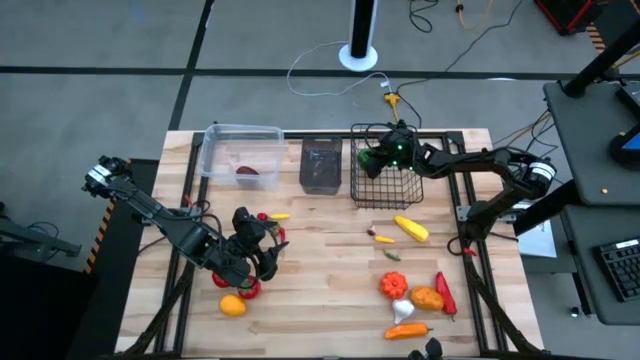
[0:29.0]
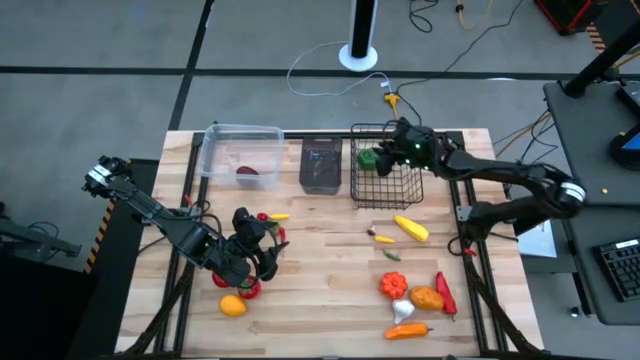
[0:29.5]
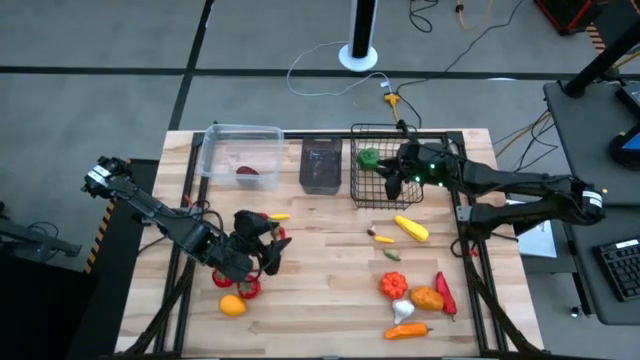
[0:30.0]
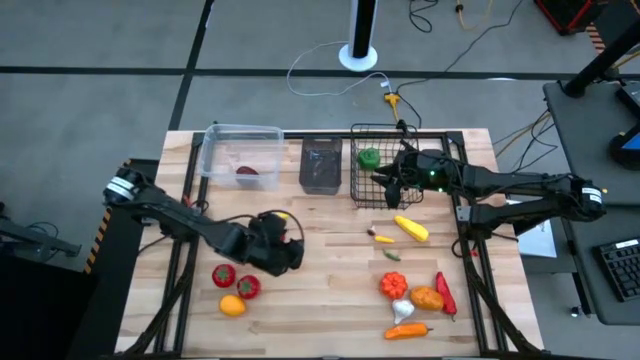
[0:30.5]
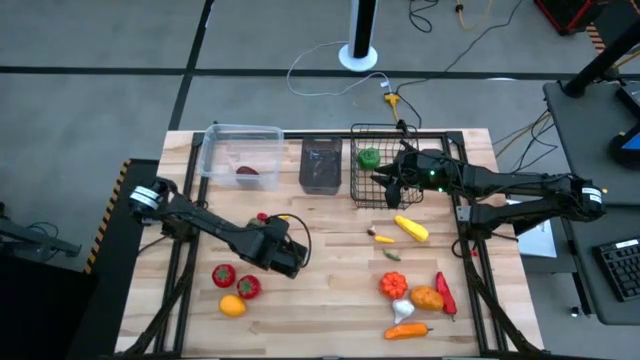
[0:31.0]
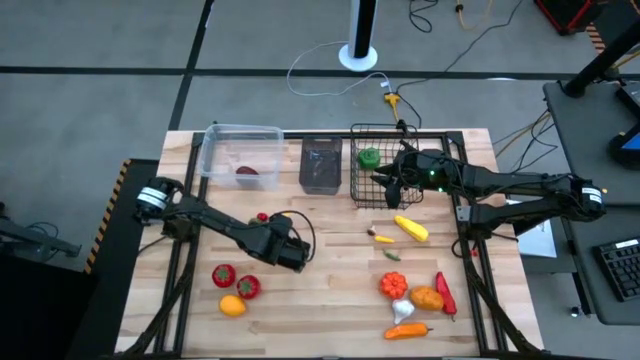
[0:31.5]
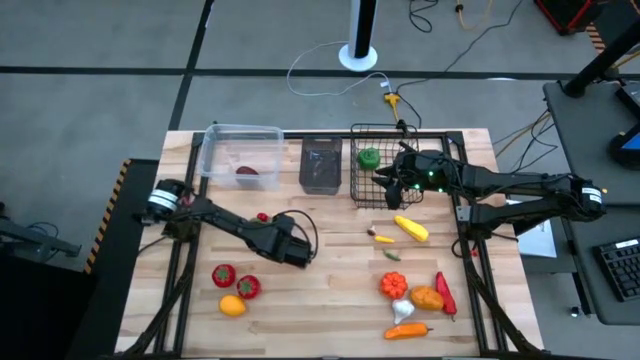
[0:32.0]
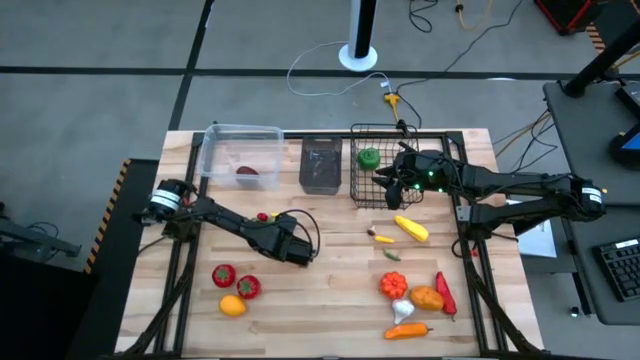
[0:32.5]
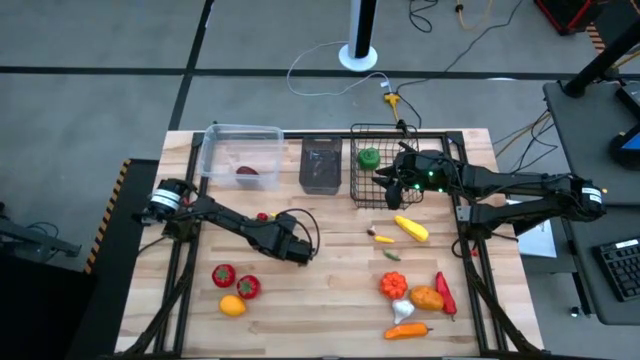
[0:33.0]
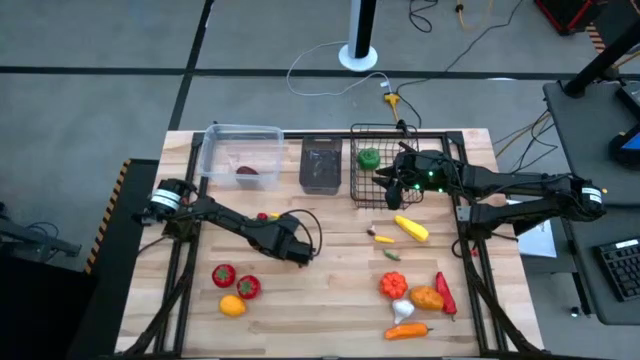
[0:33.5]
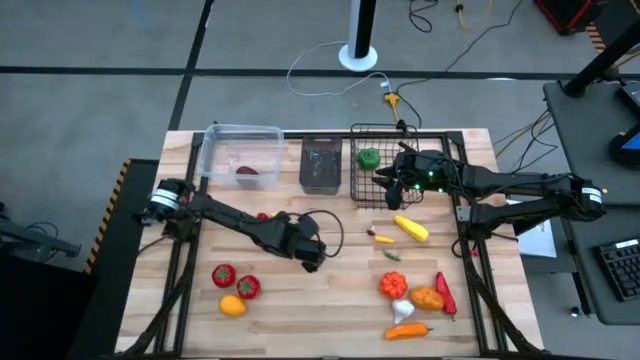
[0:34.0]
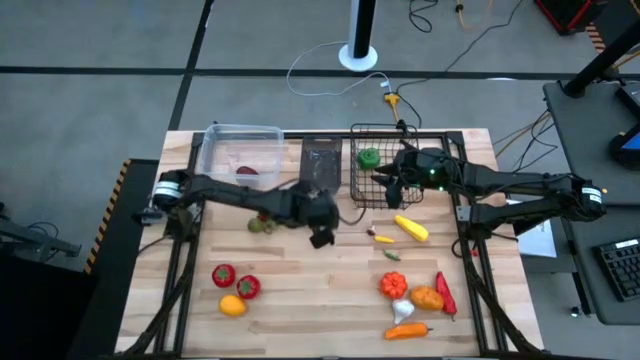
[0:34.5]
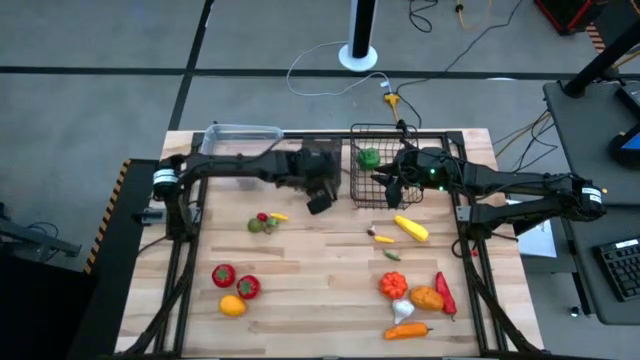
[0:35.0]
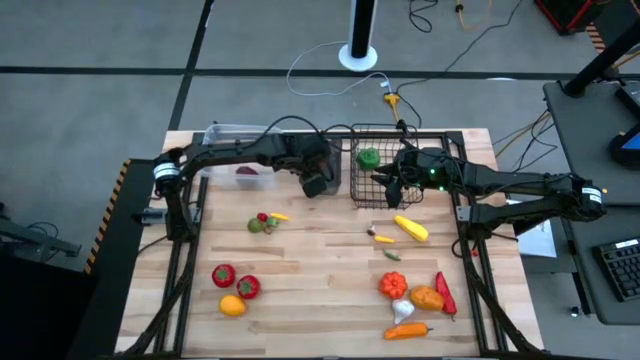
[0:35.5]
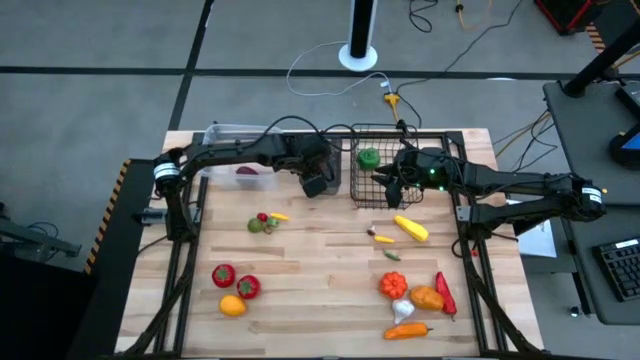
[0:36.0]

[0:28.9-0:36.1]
Task: Sort produce into baskets
Put the red chili pepper into the black bin

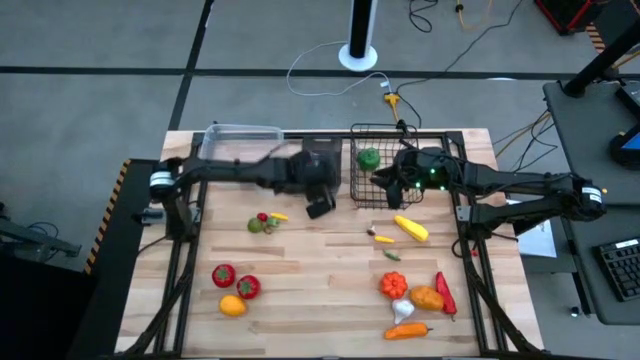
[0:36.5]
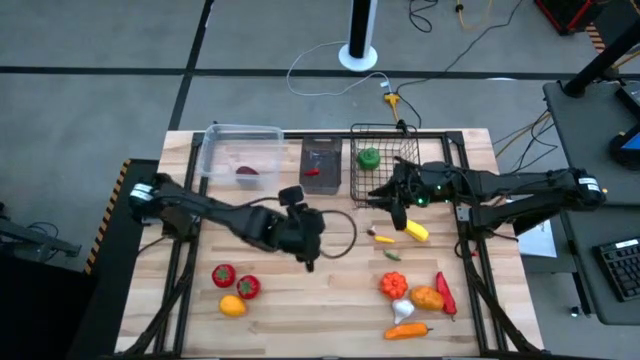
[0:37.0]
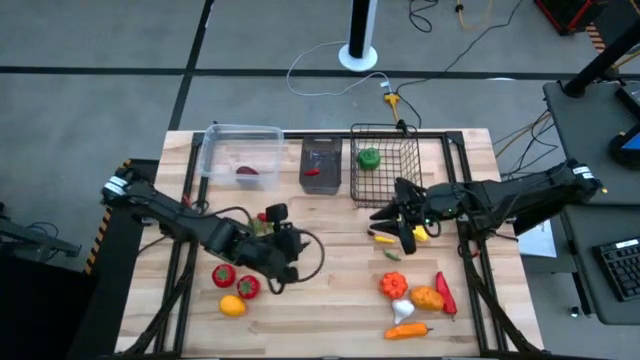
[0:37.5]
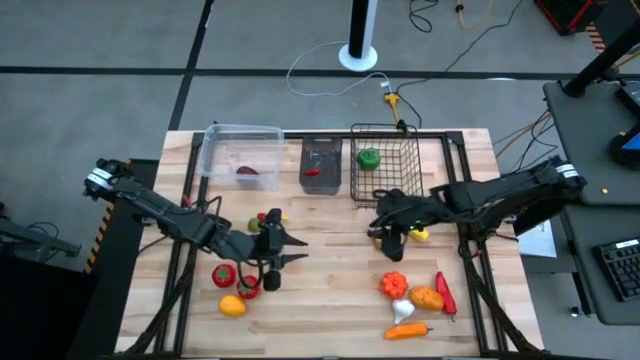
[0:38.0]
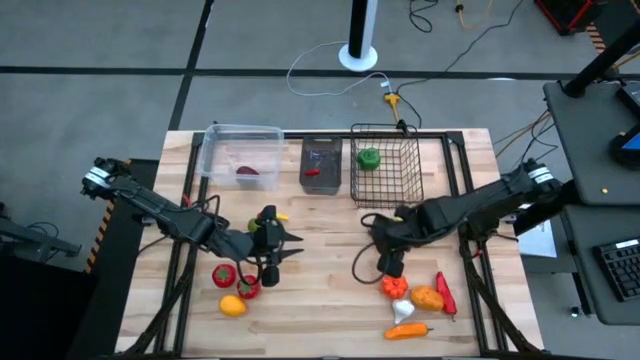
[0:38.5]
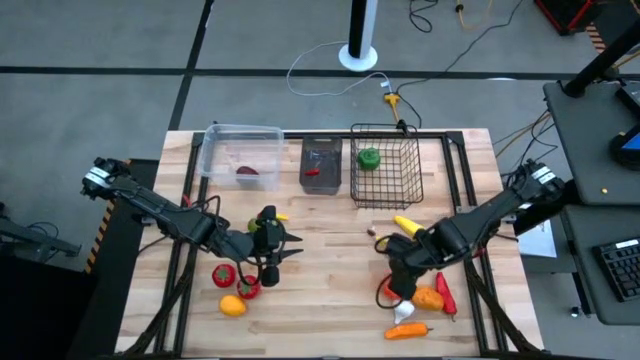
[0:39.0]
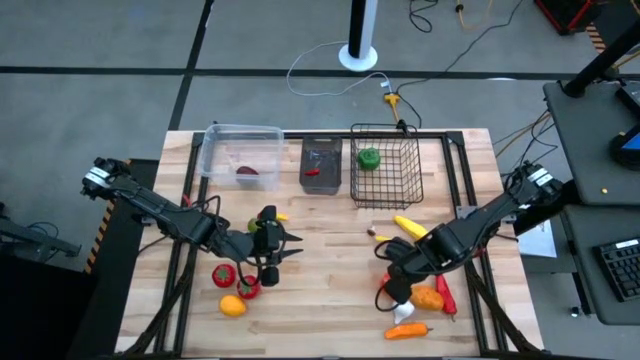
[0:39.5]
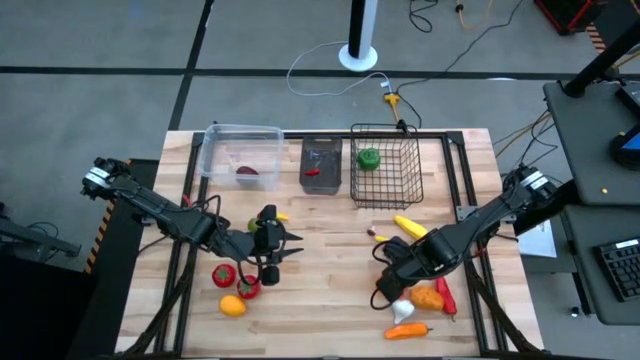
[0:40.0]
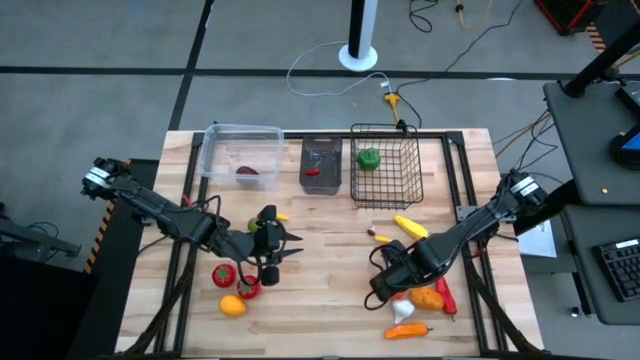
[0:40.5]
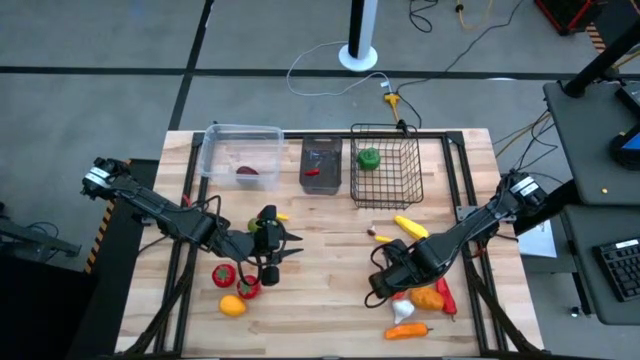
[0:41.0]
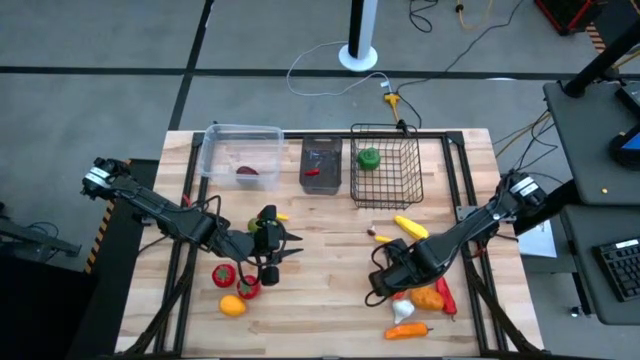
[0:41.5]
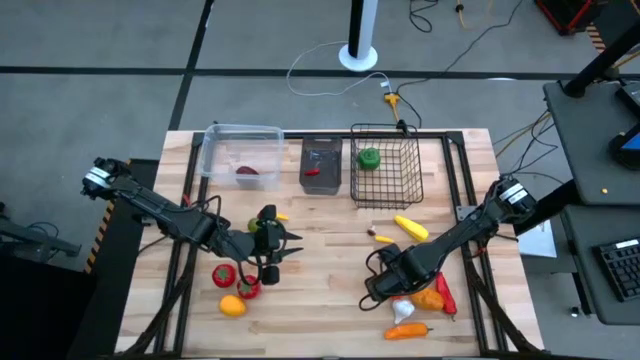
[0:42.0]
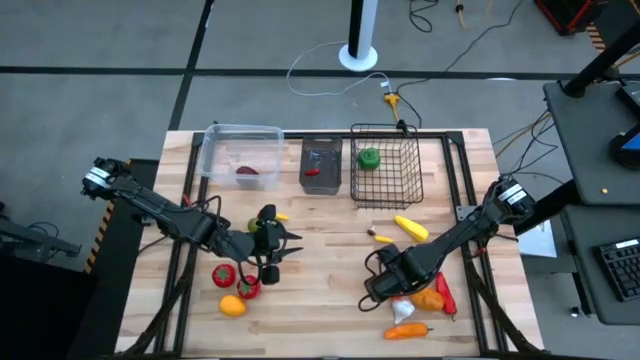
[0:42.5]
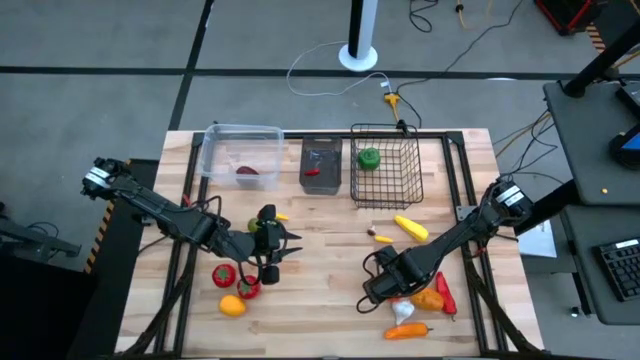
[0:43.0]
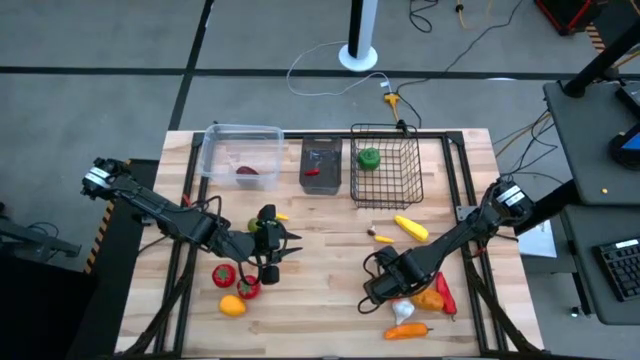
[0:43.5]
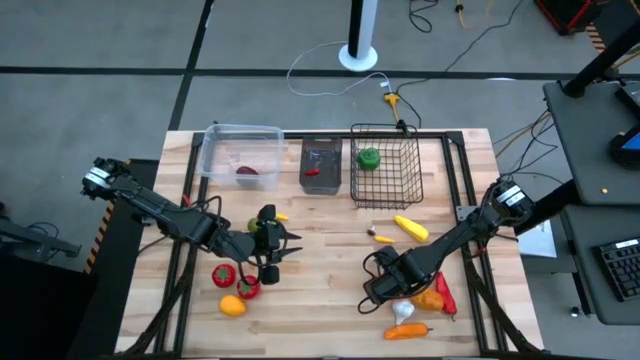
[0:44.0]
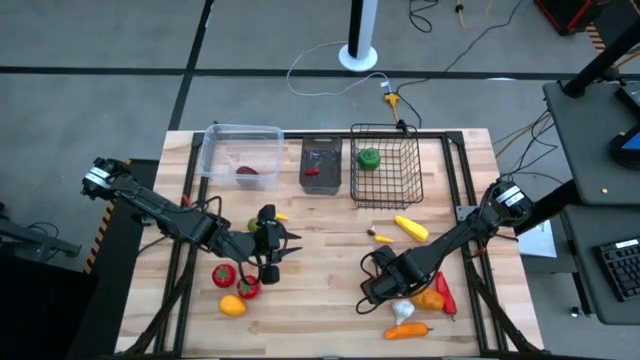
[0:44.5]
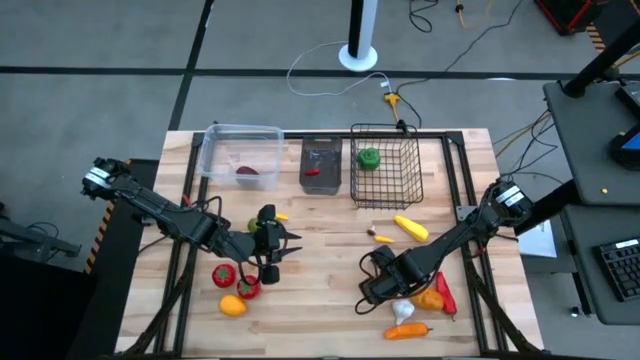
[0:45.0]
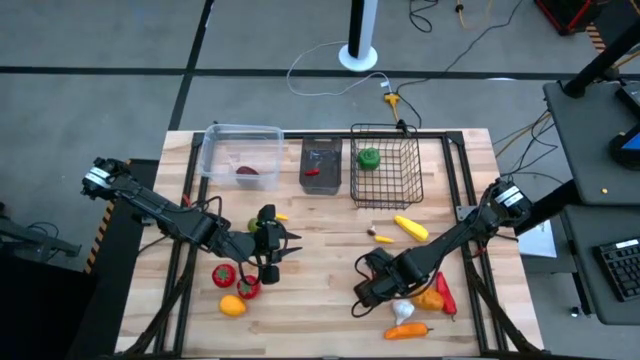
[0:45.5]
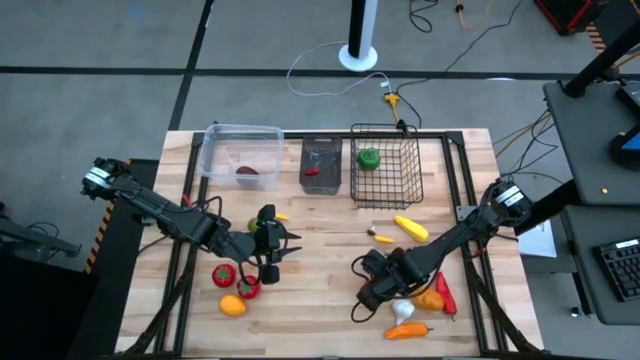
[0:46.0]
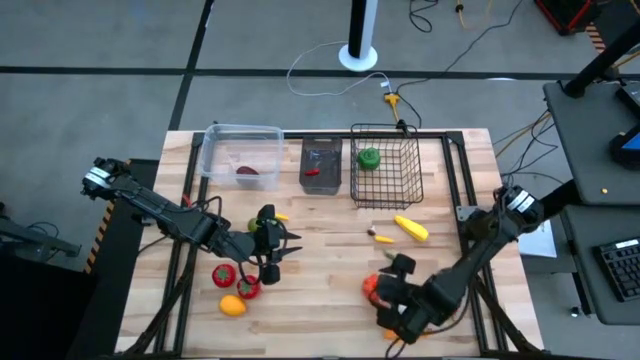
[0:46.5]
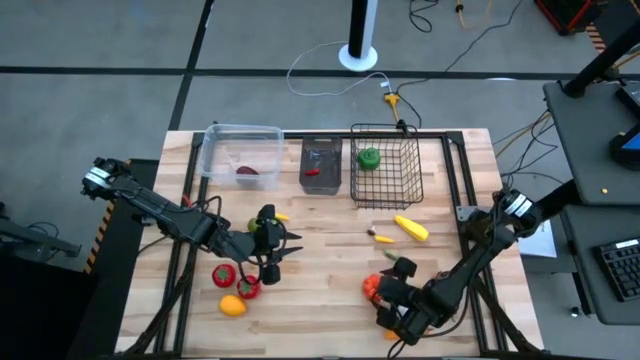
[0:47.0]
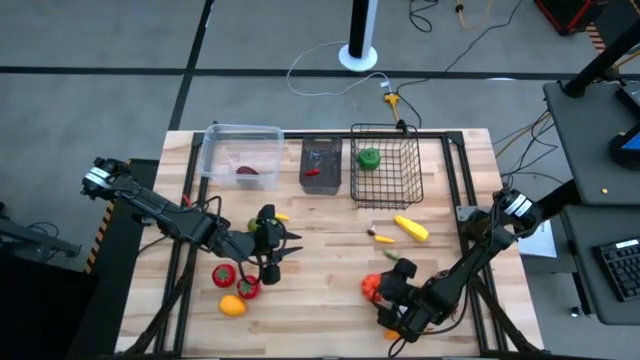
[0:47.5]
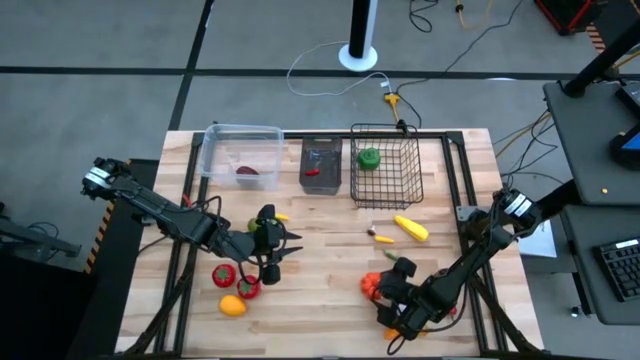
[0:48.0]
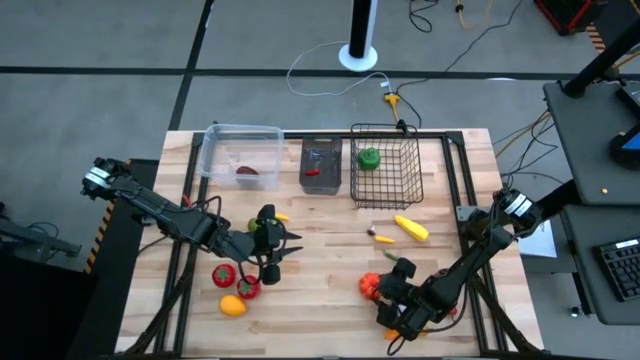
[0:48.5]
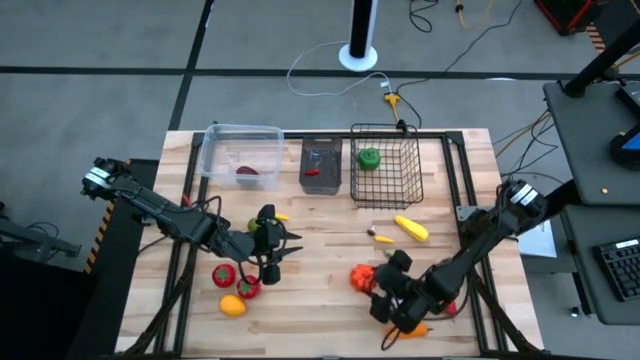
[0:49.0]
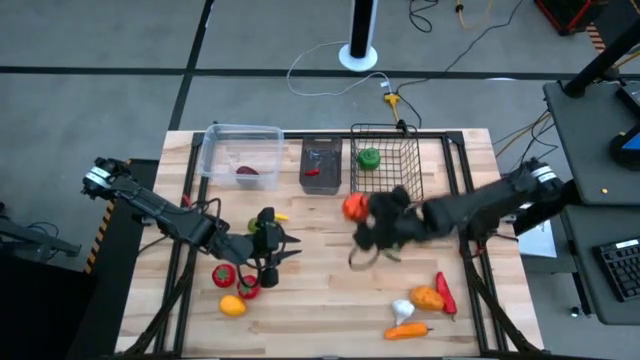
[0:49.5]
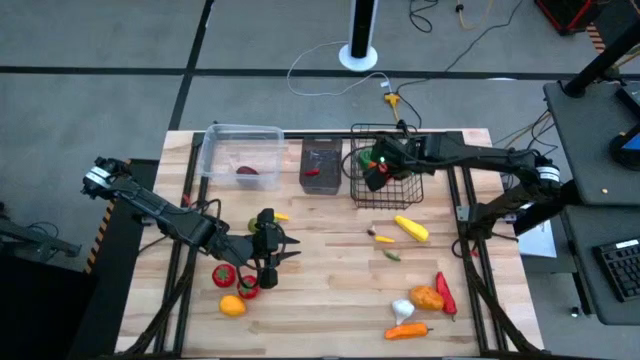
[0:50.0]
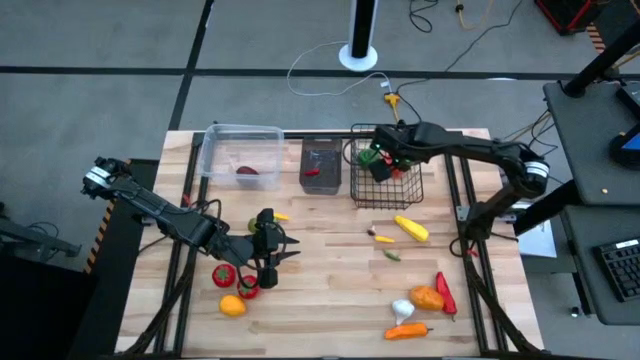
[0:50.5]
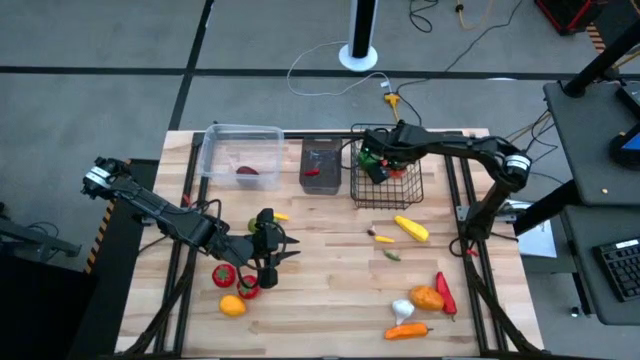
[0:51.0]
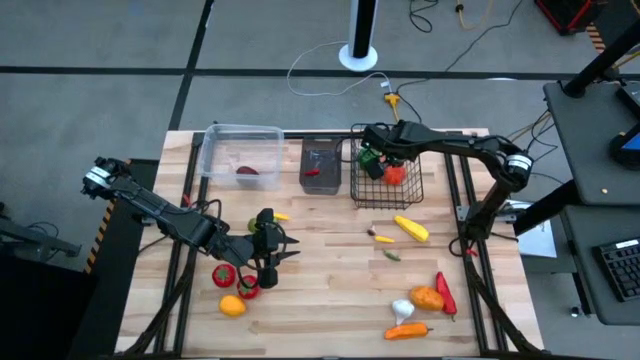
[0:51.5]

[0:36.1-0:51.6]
Put the orange pumpkin into the wire basket
